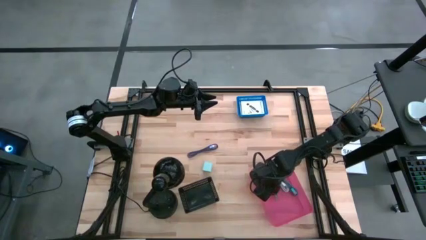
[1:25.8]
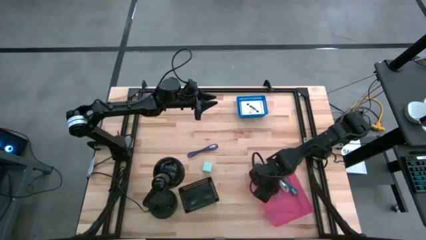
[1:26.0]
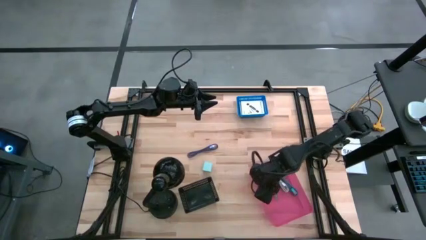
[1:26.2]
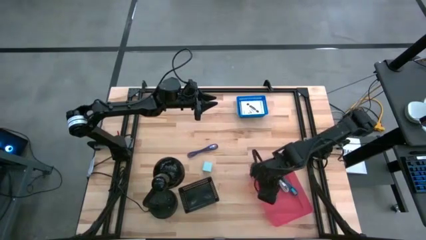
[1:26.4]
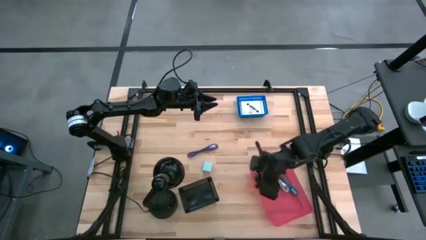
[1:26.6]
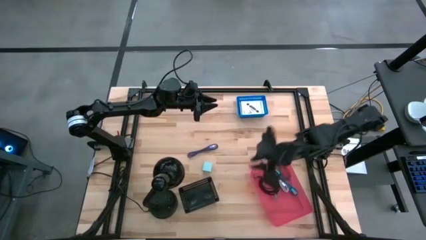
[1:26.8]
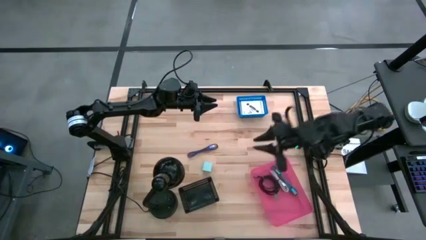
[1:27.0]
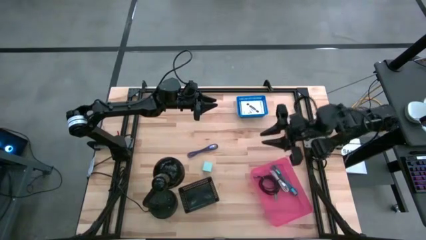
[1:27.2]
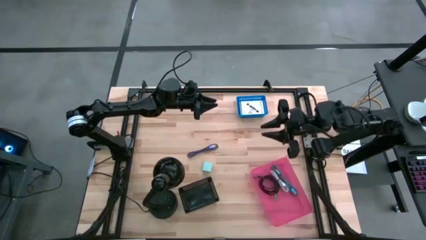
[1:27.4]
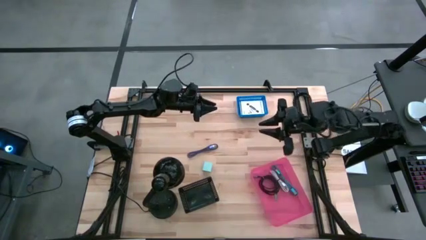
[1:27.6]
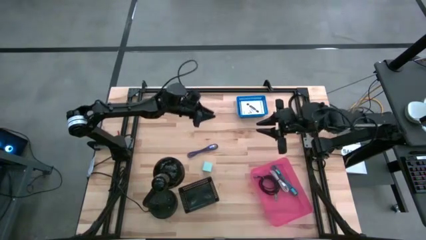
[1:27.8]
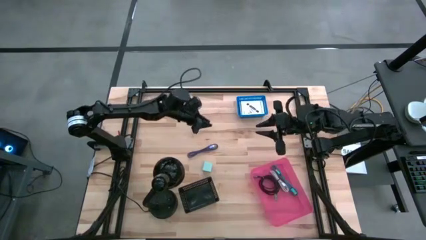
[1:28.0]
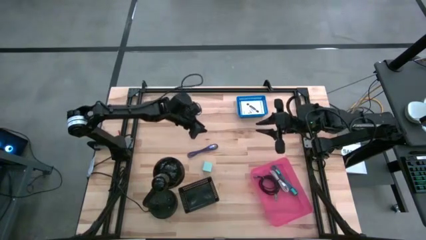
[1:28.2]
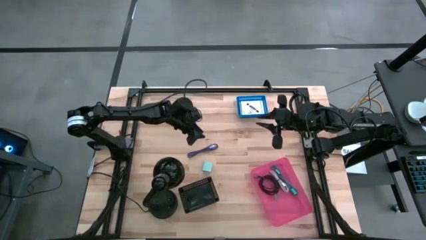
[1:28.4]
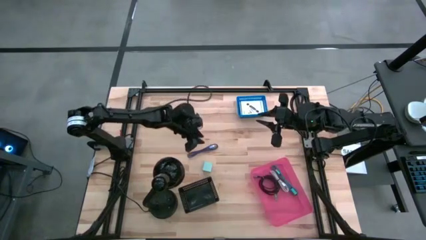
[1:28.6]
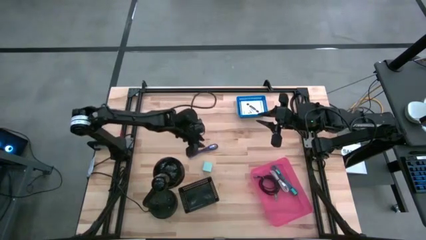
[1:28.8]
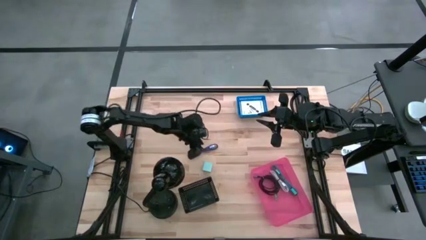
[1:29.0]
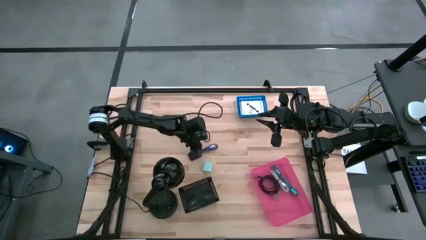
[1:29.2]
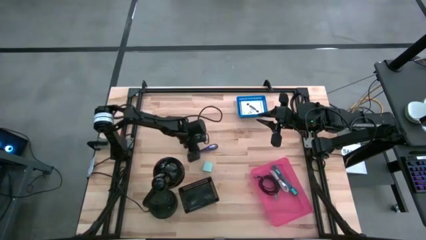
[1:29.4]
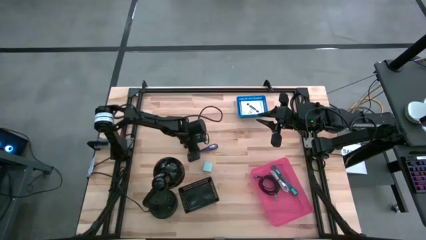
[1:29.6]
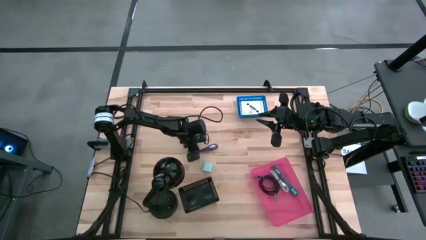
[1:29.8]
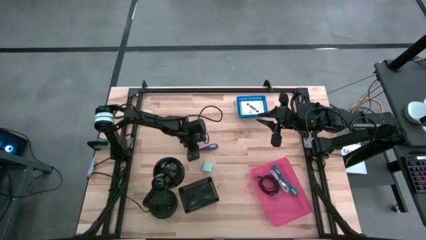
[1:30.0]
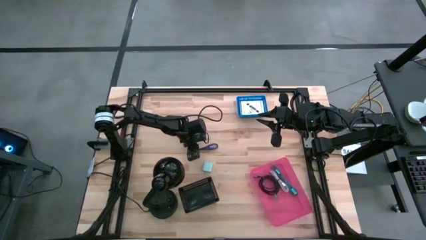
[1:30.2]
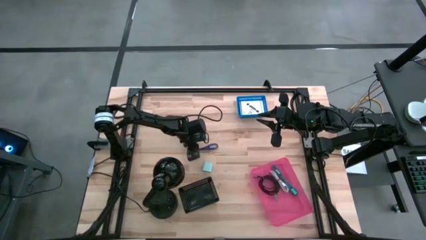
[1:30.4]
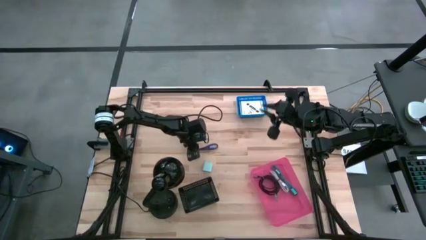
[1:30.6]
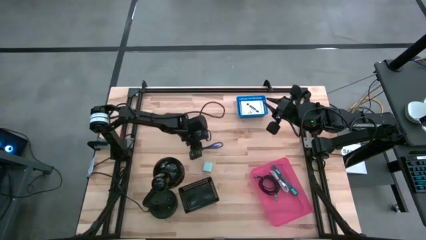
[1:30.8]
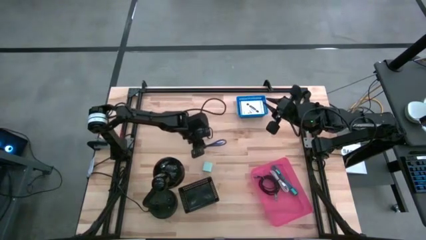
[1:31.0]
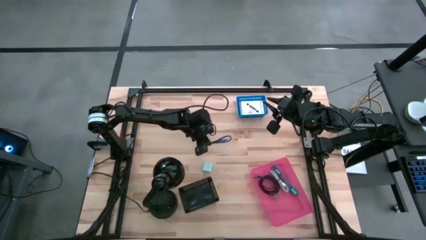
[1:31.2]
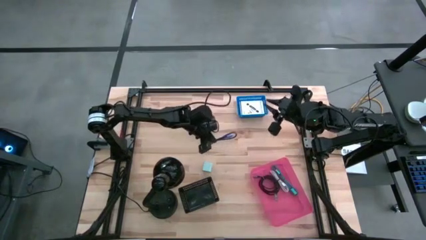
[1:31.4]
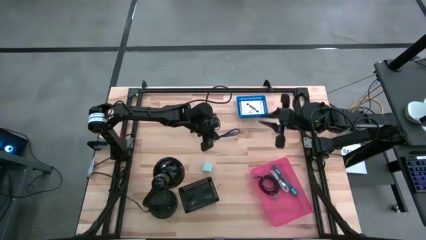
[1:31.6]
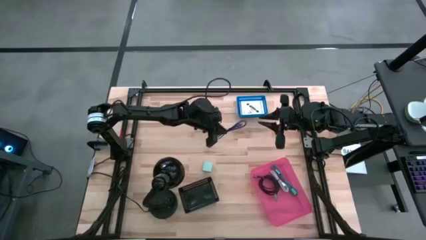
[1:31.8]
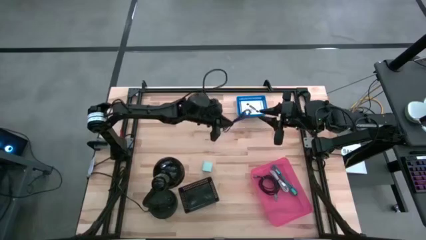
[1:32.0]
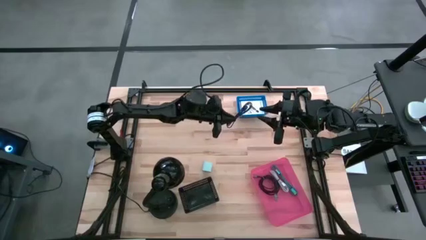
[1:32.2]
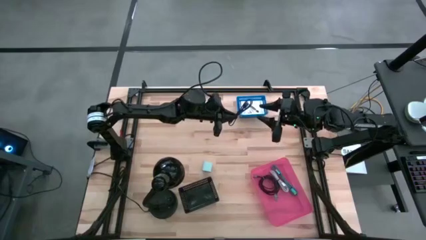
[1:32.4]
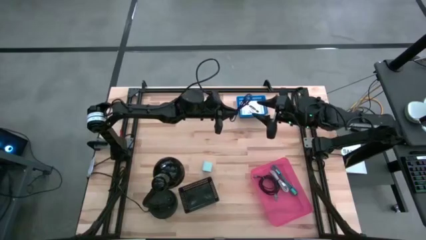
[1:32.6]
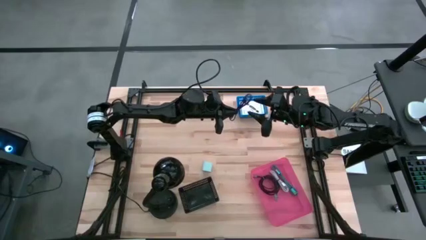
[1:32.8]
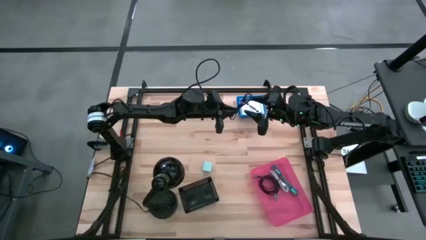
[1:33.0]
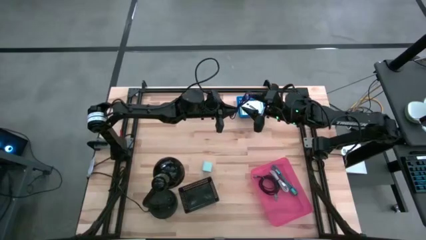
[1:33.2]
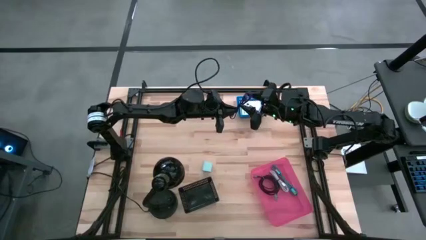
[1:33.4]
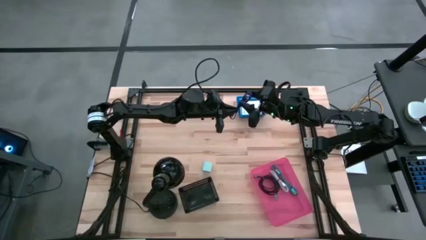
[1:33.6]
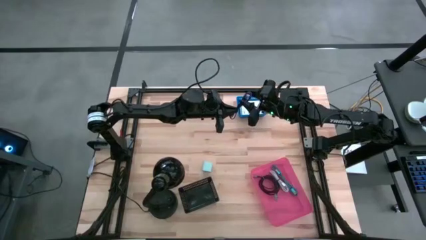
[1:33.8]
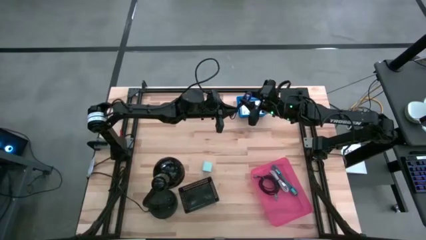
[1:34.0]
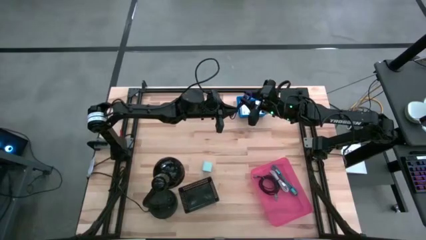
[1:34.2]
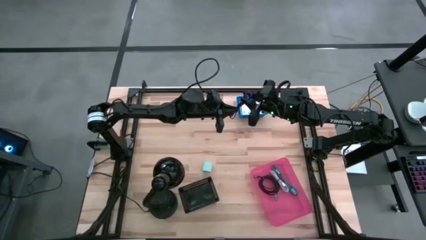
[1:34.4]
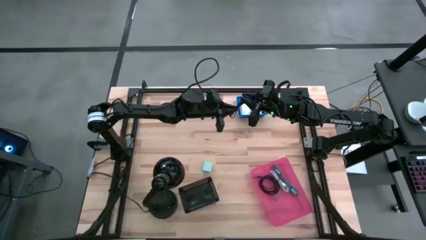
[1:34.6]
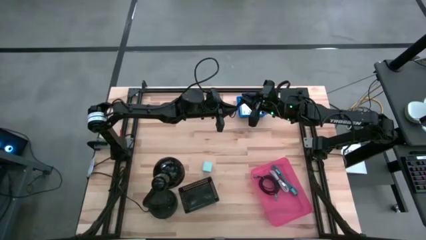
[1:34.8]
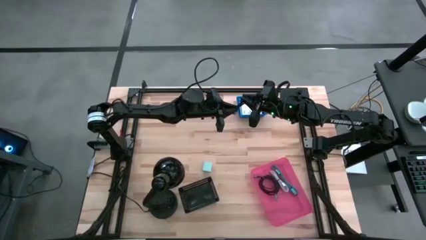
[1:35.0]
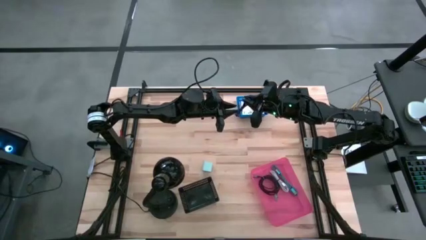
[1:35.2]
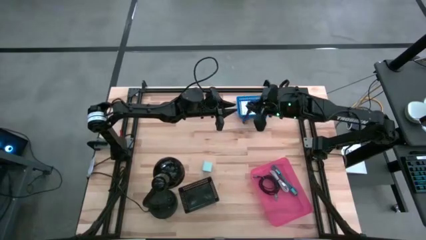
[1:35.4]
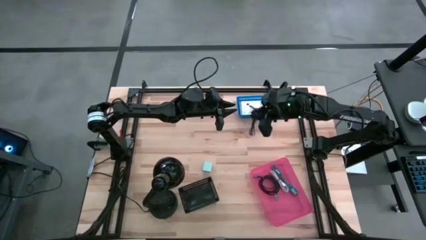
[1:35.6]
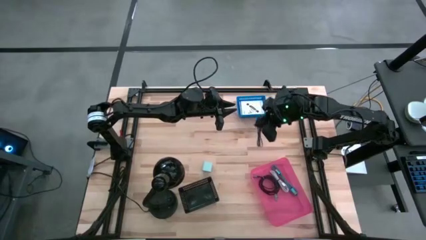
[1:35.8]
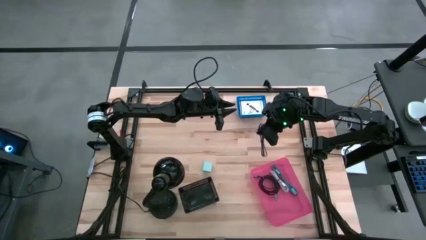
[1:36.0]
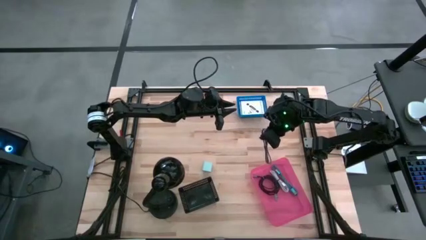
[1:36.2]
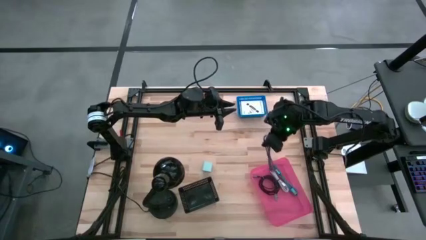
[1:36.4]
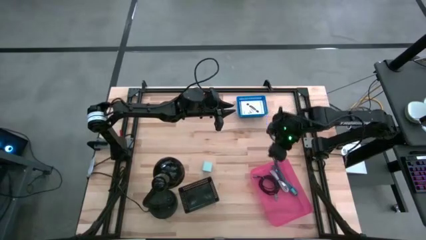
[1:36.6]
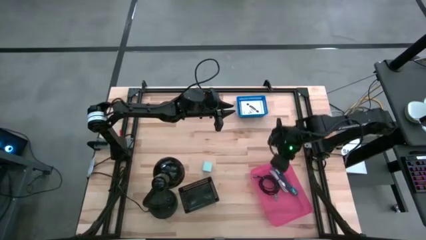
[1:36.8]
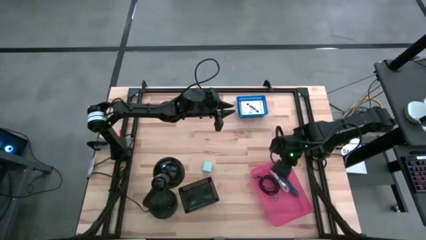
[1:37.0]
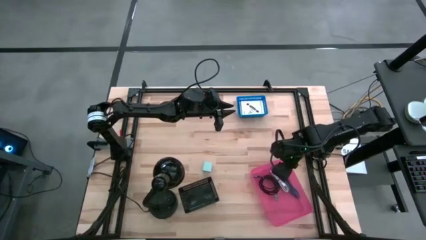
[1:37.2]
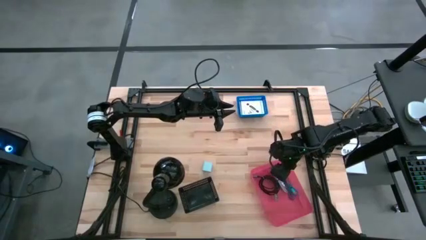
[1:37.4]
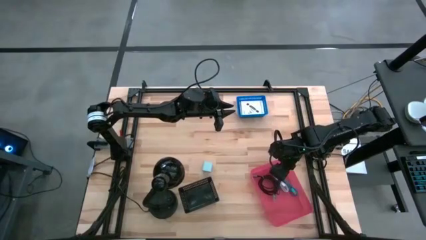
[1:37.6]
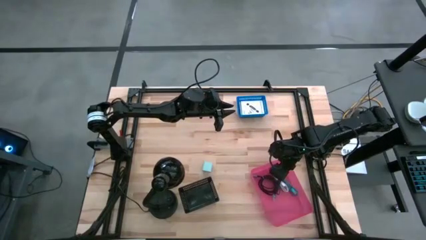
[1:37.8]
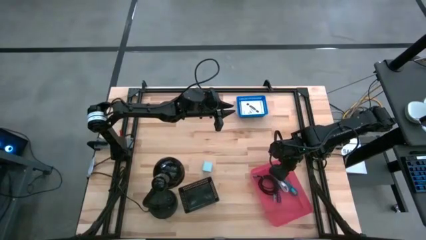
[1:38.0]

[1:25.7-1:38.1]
Task: Pick and place items into bin
Put the violet charger cable into the pink bin
